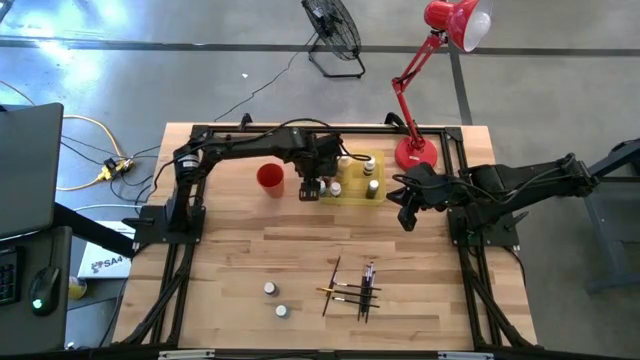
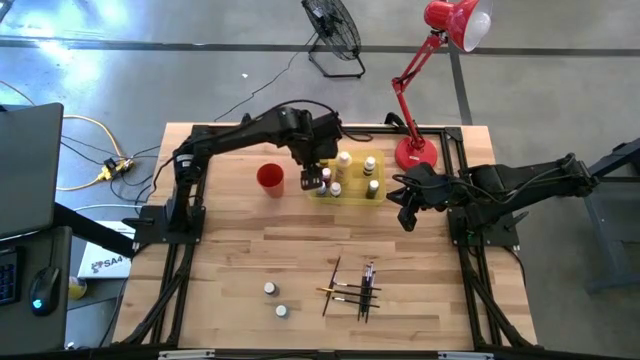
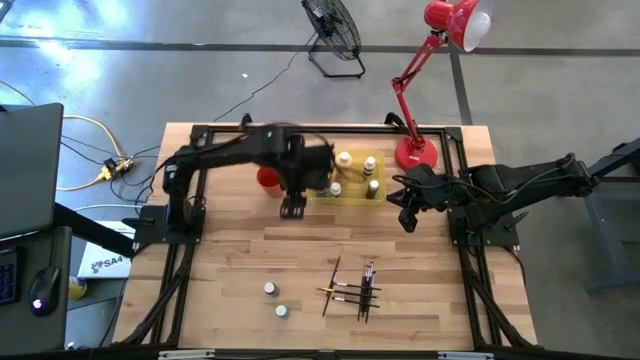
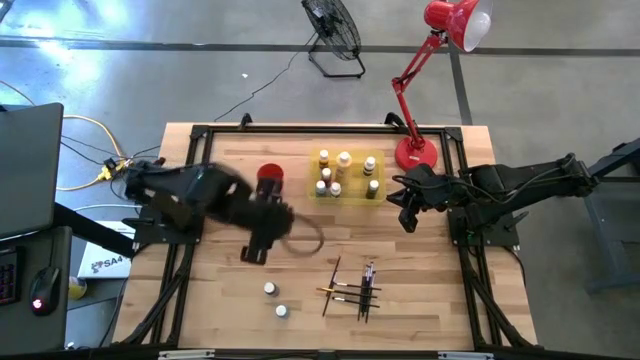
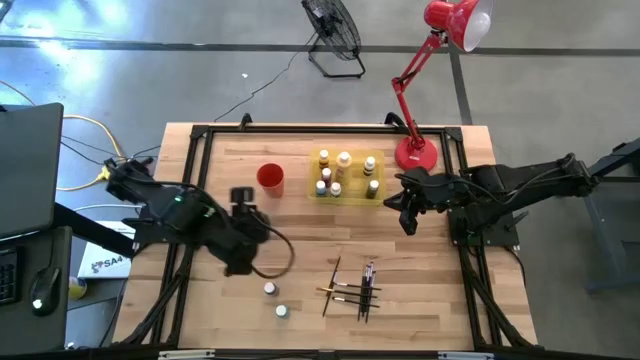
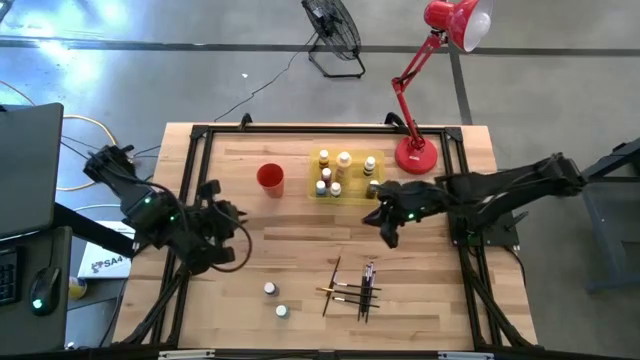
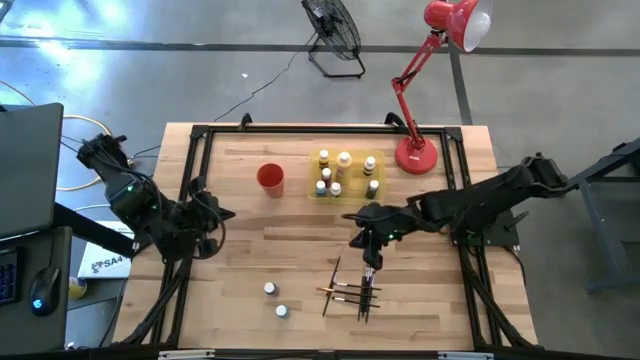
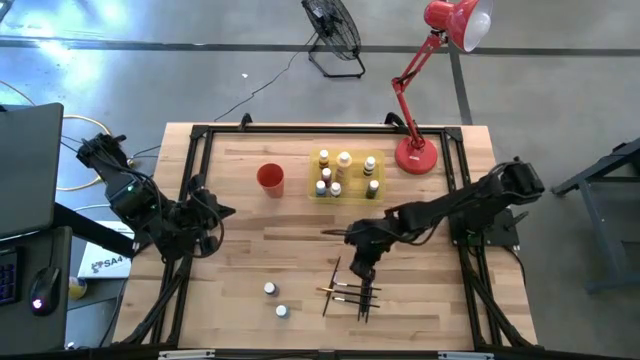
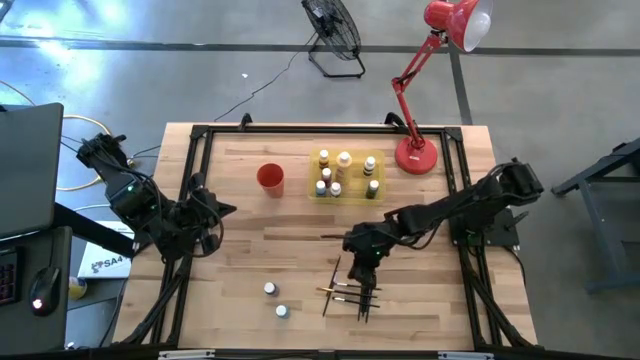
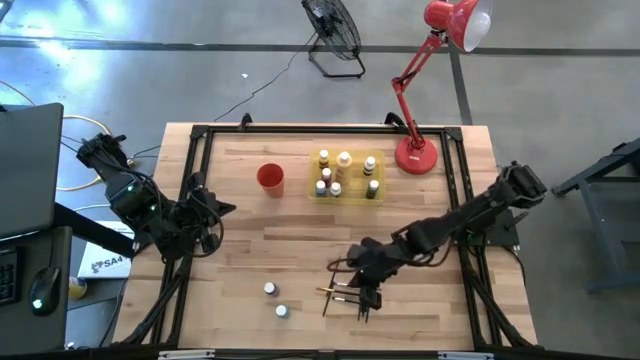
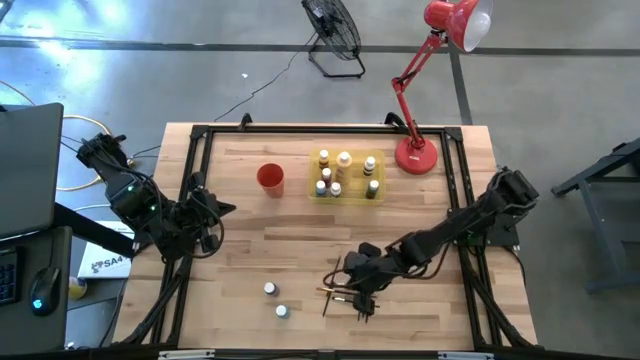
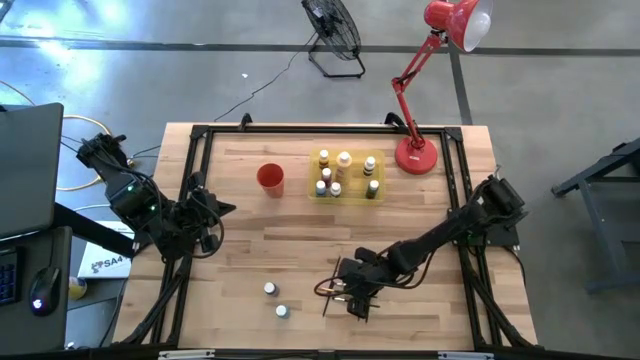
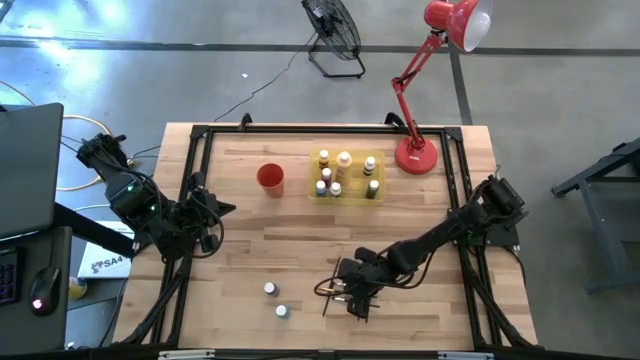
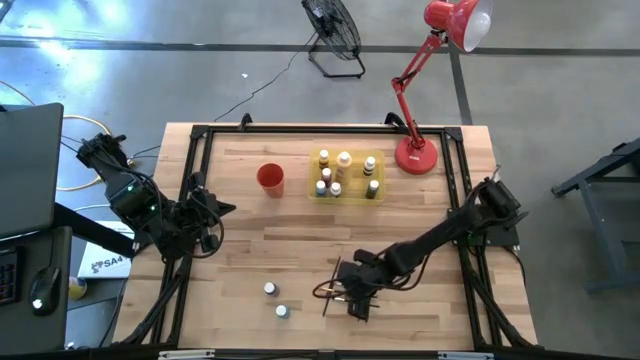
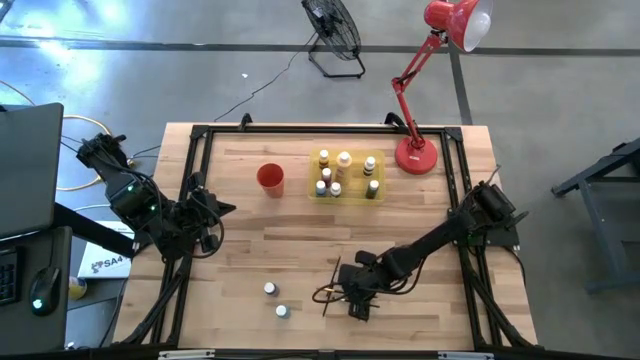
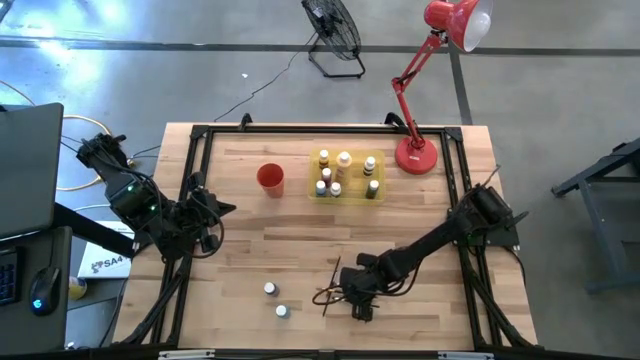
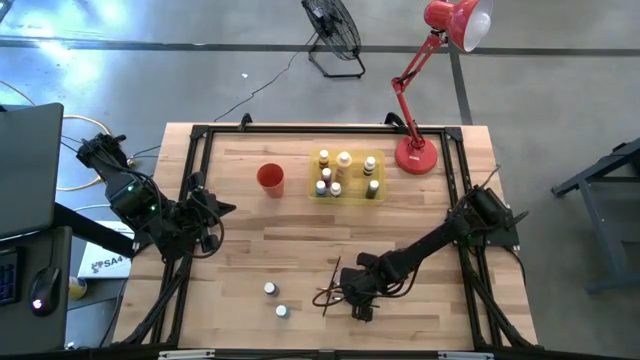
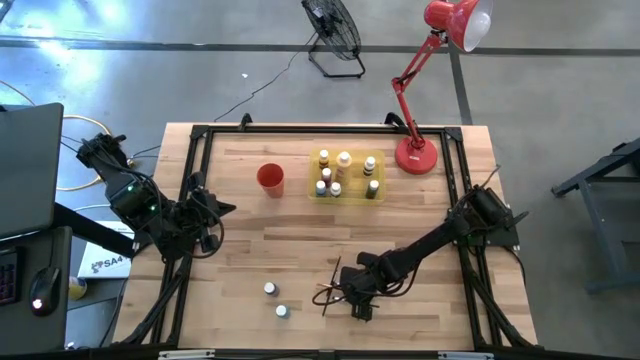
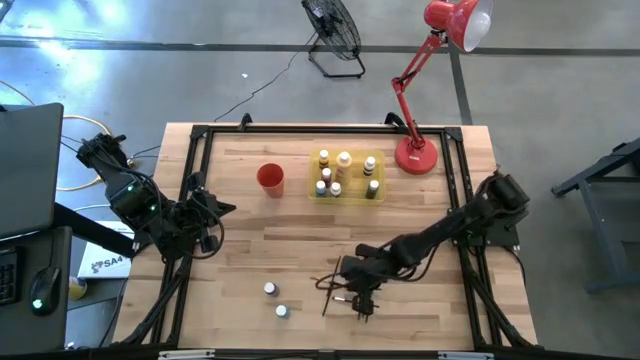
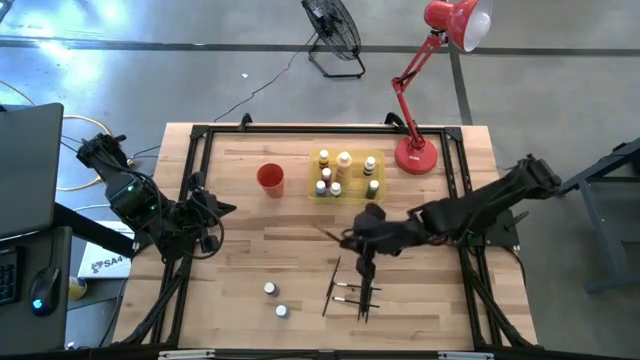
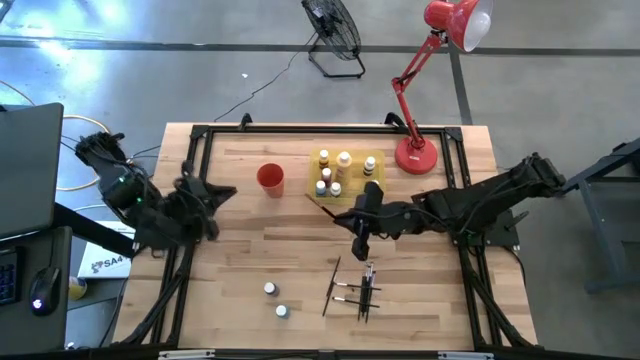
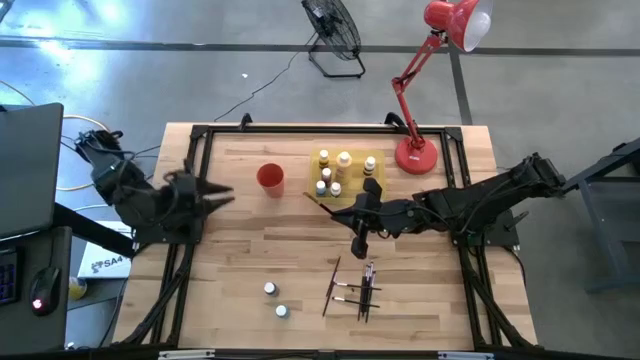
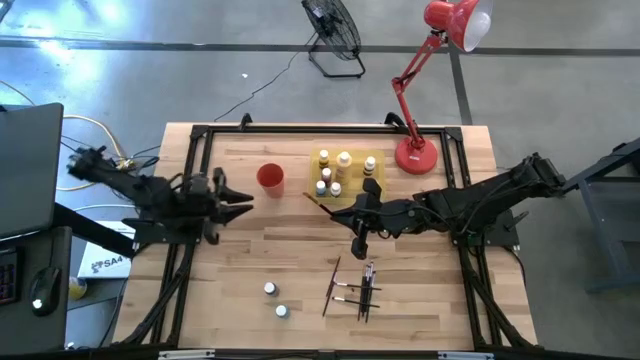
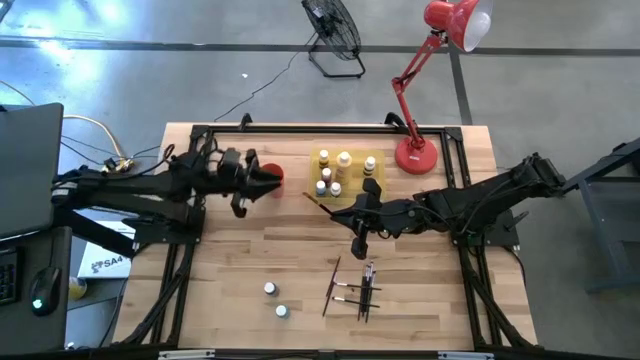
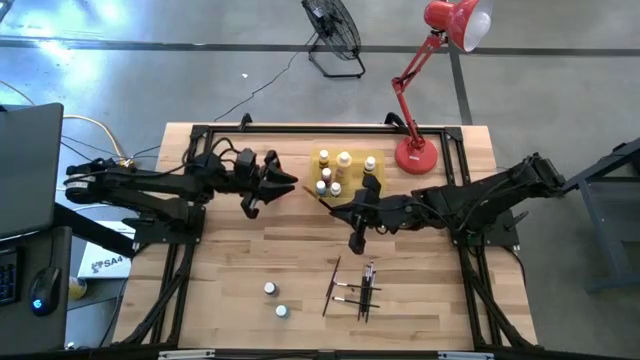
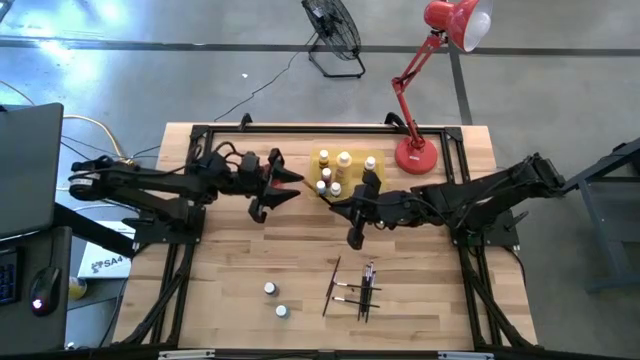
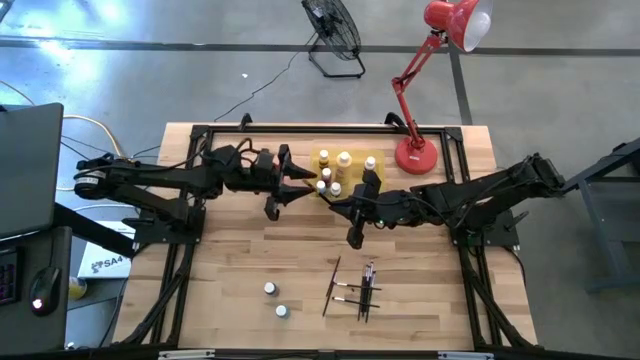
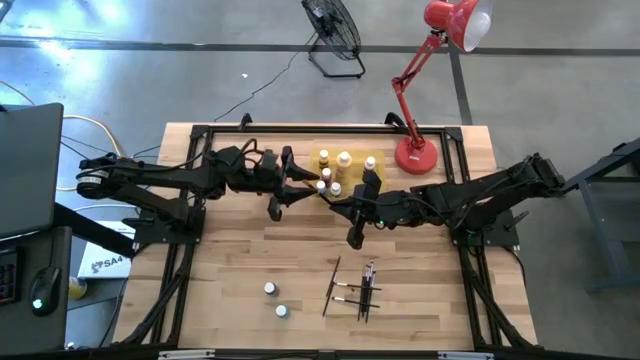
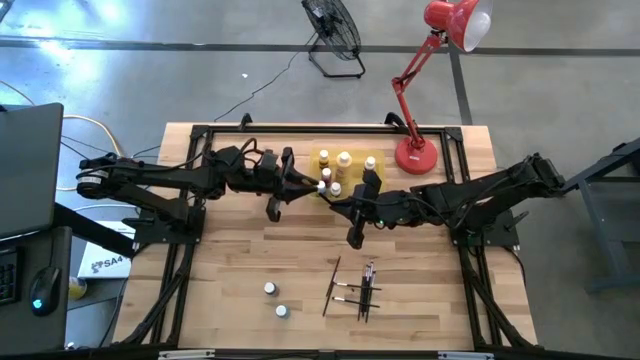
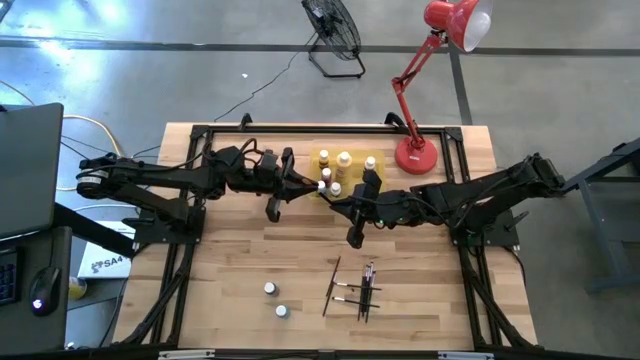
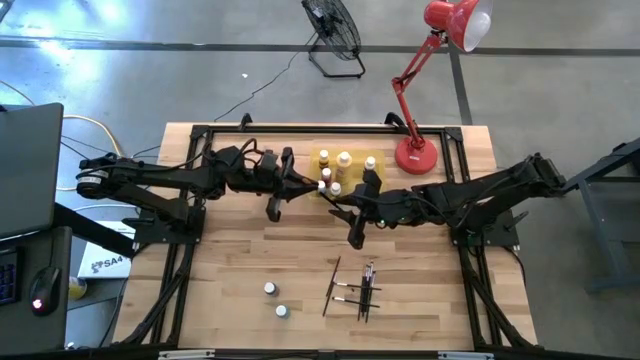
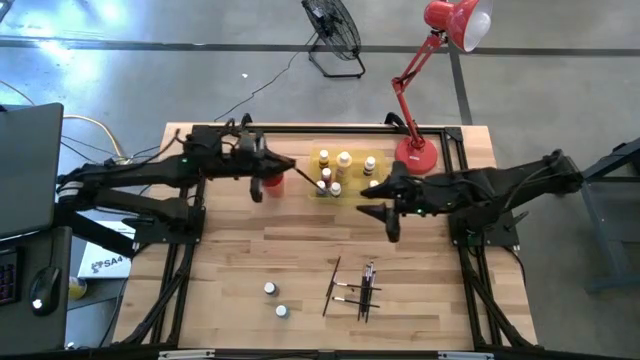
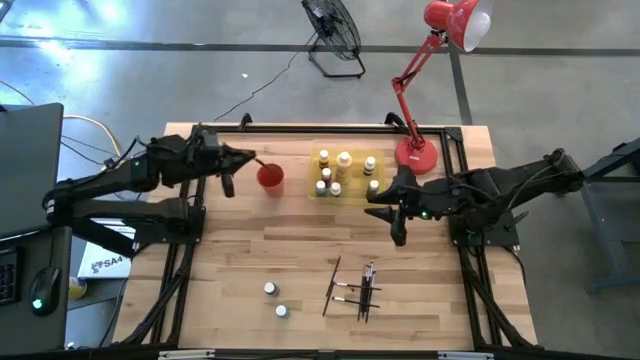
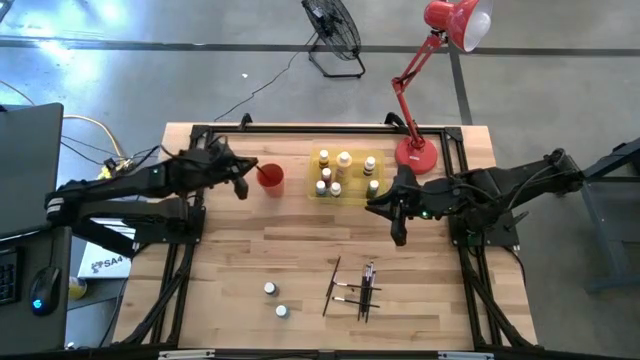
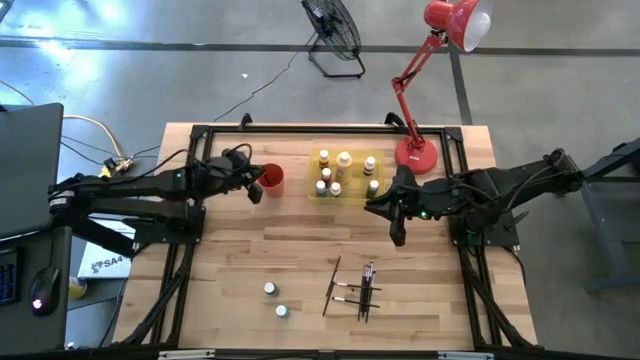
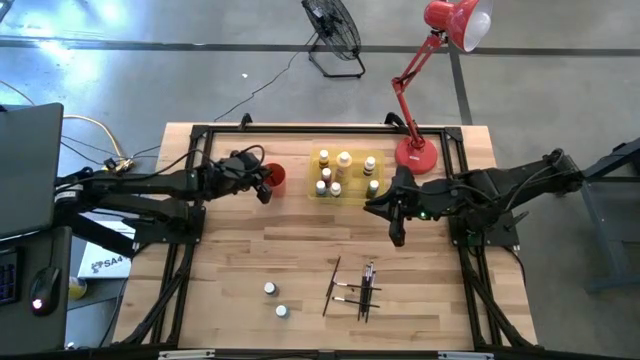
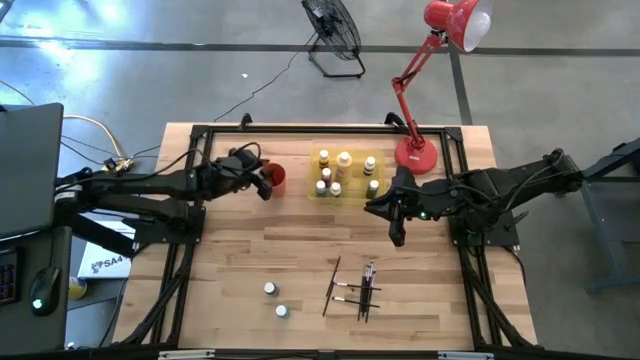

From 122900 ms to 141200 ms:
Task: Pick & Place Paint Supplies
Put the orange paintbrush into the orange cup

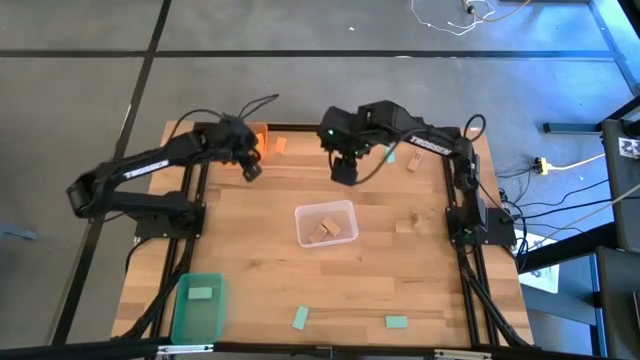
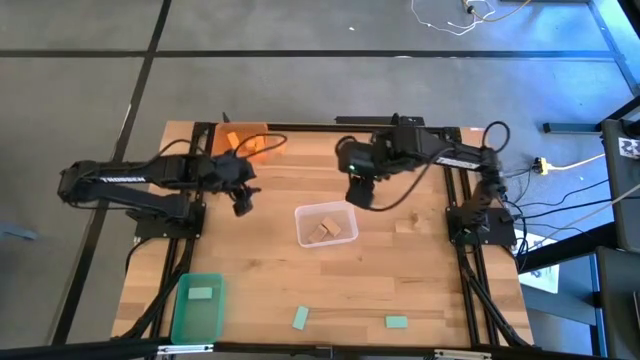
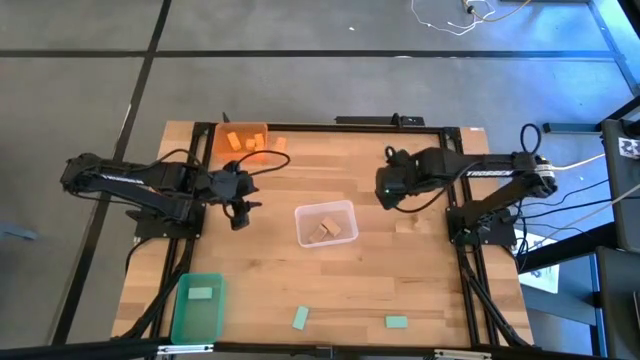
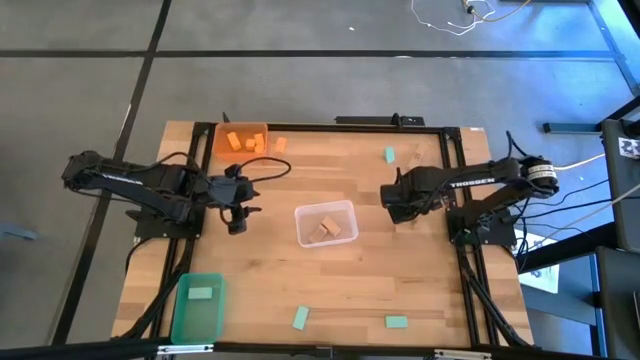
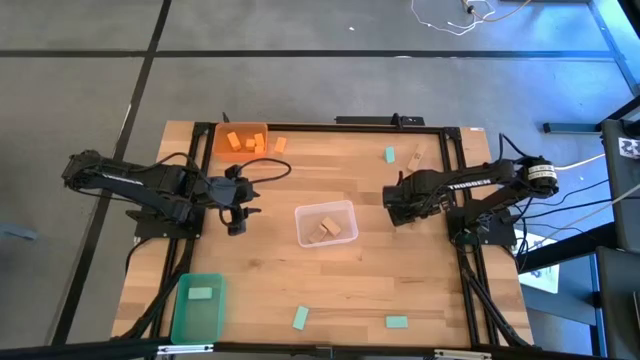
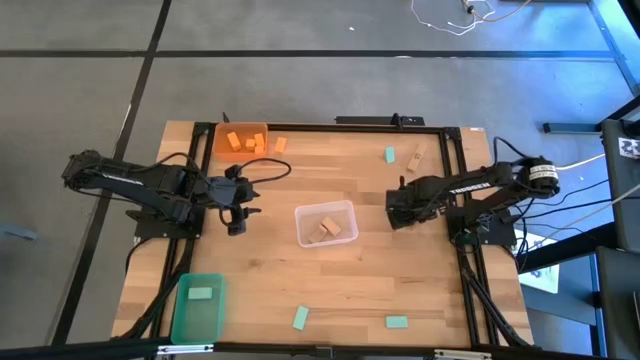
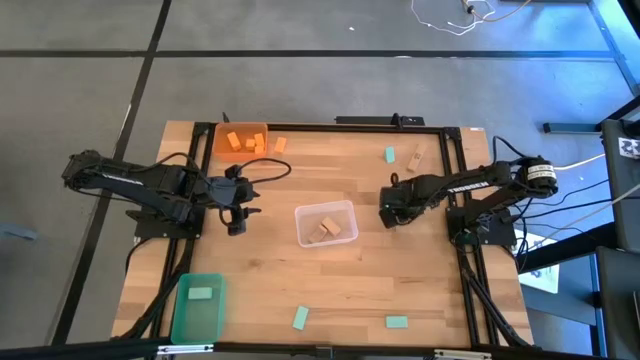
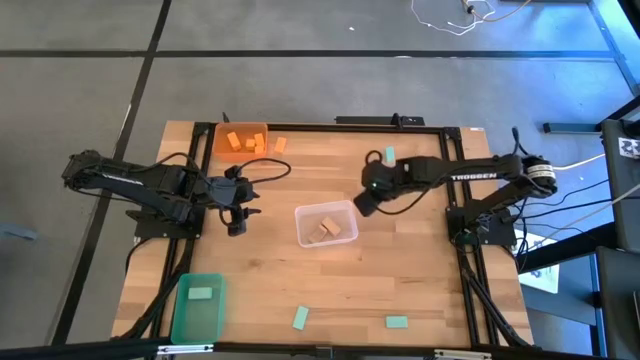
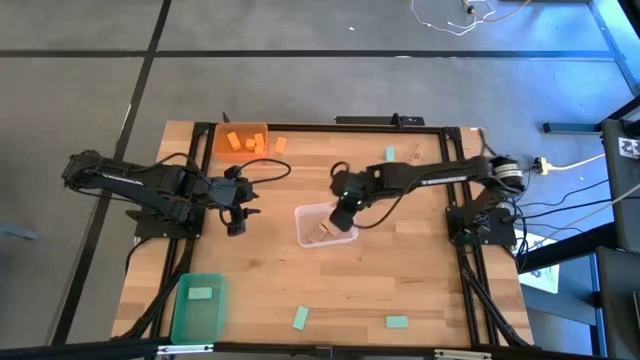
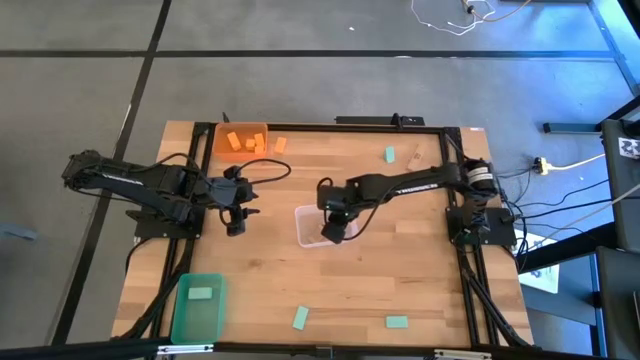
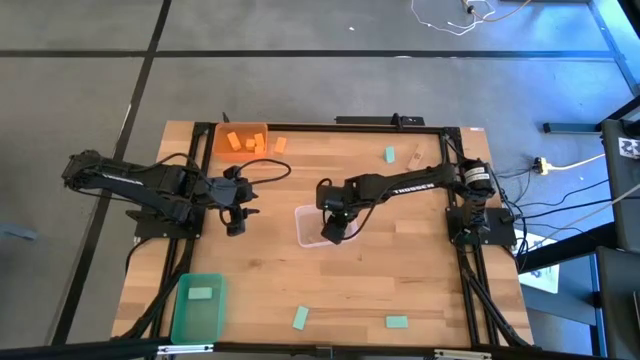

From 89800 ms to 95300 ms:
Task: Sort & place blocks by color
Put the brown block into the white bin
